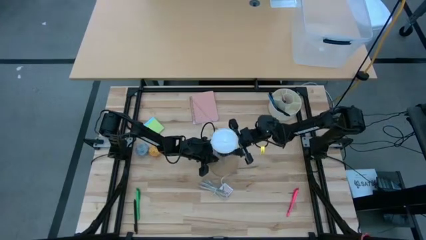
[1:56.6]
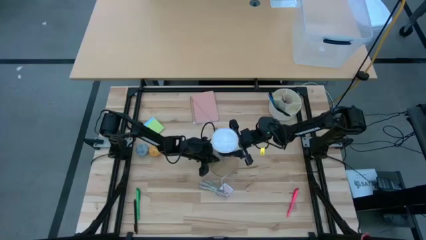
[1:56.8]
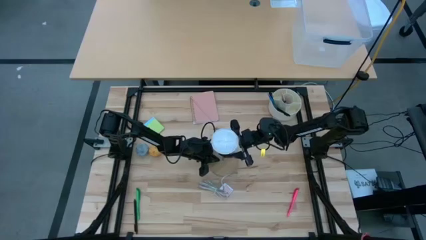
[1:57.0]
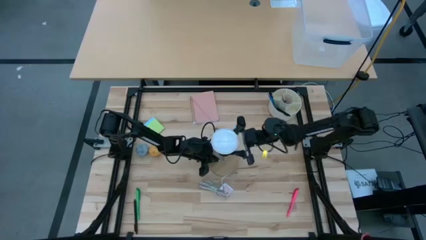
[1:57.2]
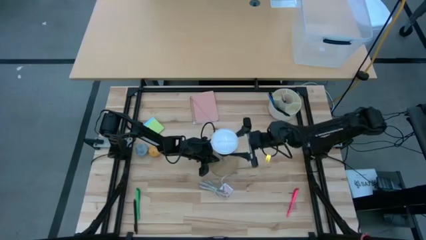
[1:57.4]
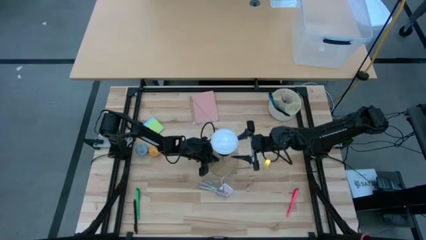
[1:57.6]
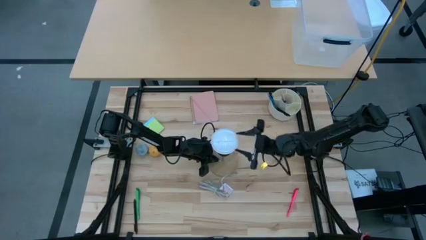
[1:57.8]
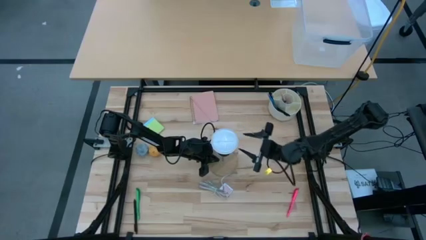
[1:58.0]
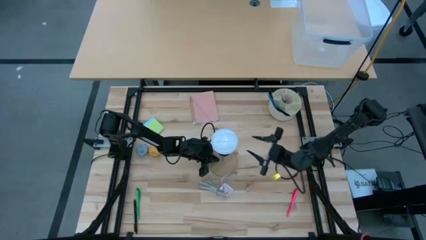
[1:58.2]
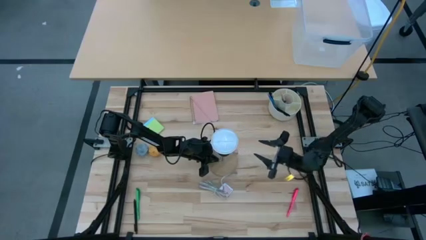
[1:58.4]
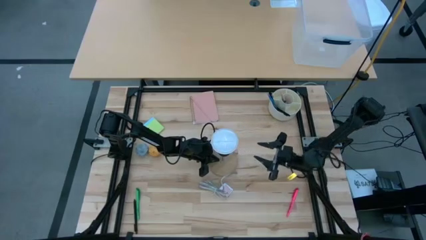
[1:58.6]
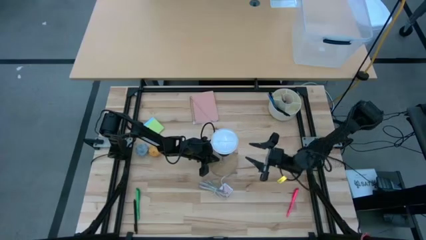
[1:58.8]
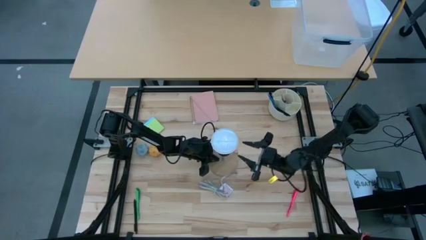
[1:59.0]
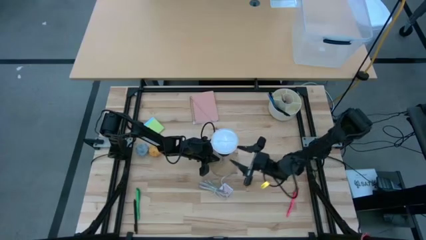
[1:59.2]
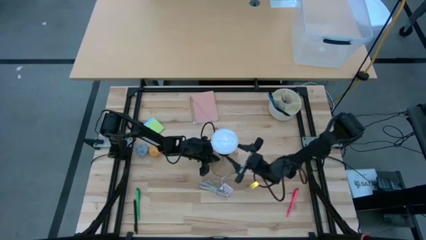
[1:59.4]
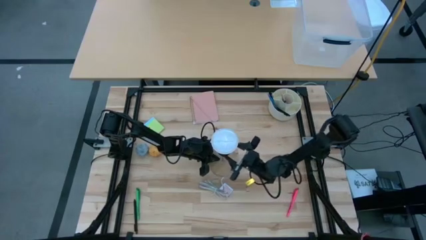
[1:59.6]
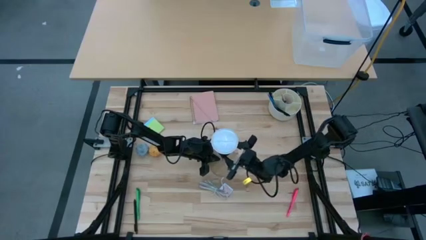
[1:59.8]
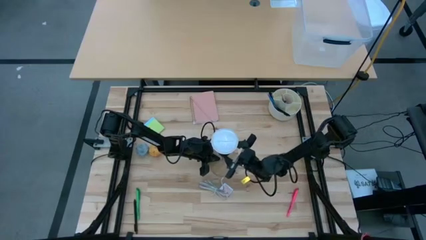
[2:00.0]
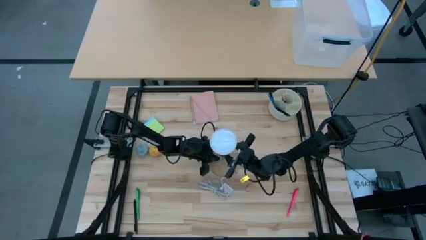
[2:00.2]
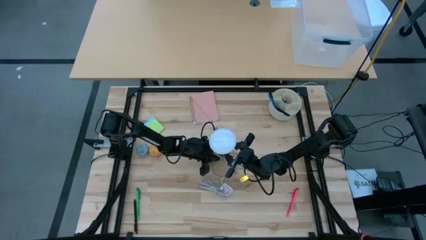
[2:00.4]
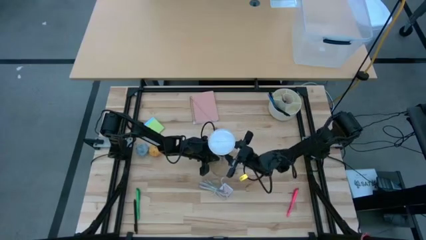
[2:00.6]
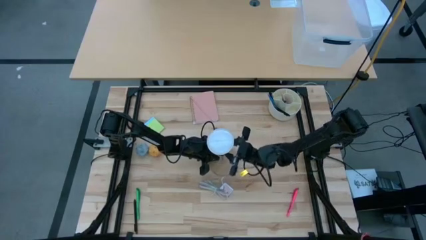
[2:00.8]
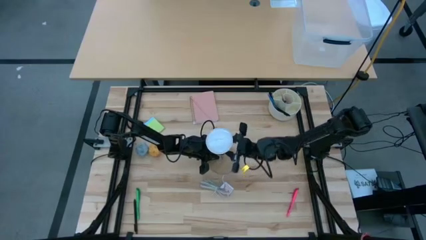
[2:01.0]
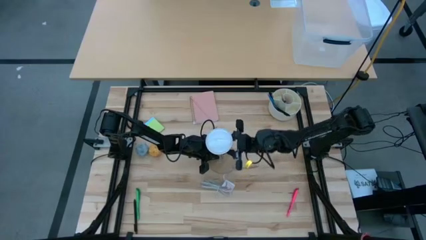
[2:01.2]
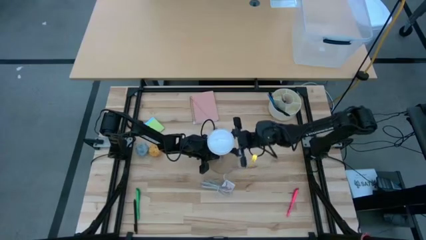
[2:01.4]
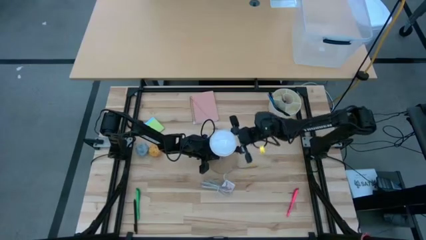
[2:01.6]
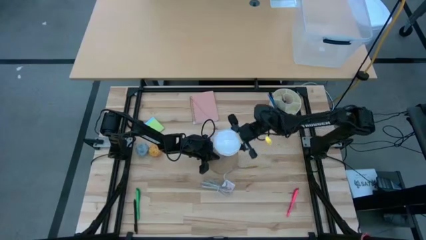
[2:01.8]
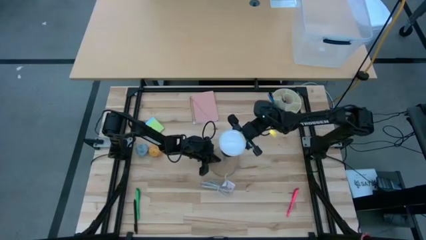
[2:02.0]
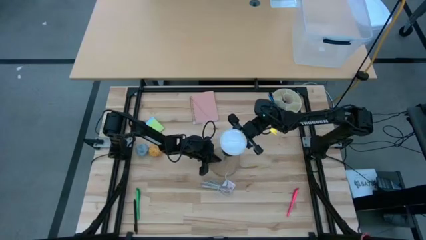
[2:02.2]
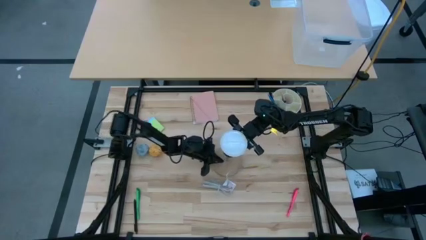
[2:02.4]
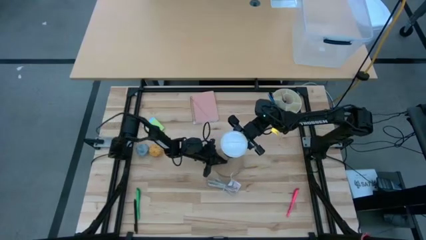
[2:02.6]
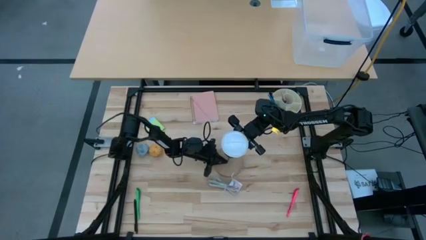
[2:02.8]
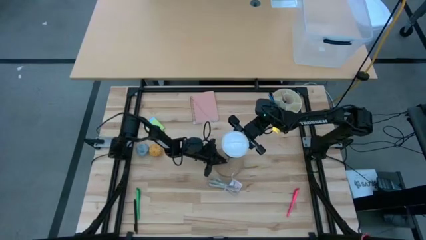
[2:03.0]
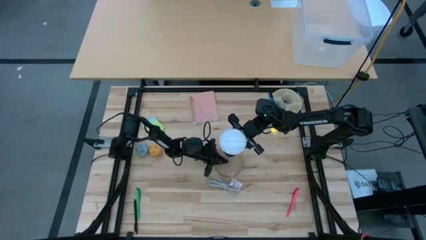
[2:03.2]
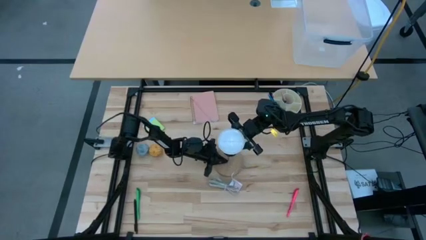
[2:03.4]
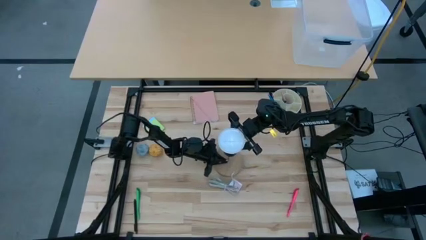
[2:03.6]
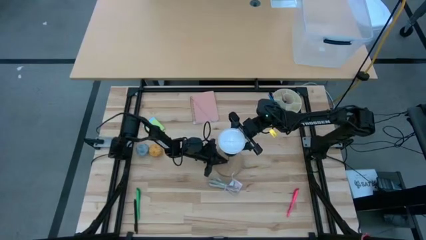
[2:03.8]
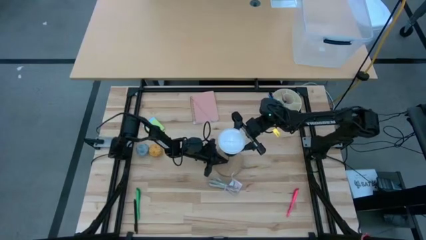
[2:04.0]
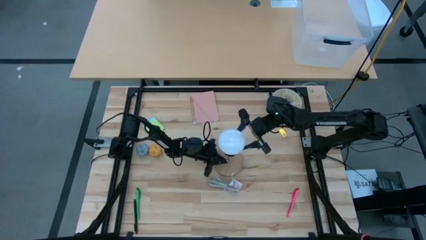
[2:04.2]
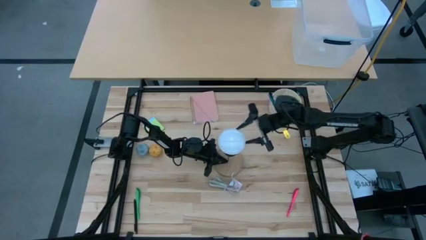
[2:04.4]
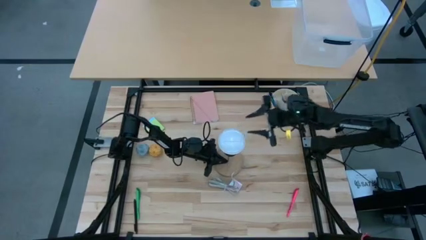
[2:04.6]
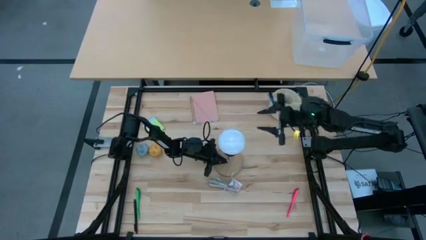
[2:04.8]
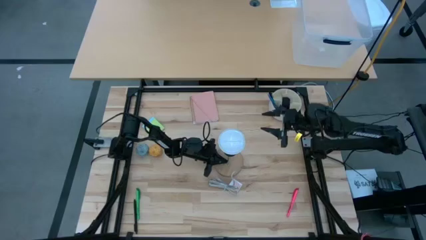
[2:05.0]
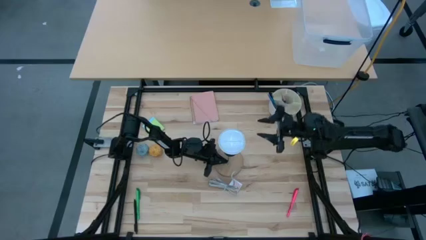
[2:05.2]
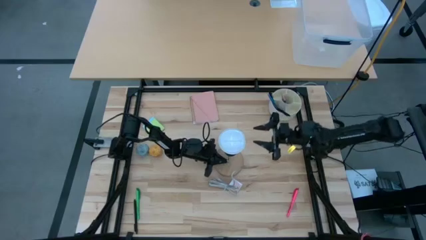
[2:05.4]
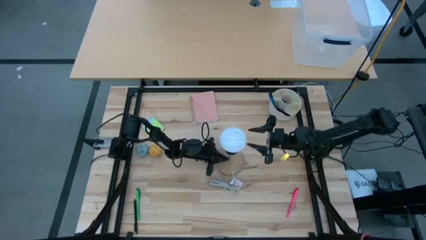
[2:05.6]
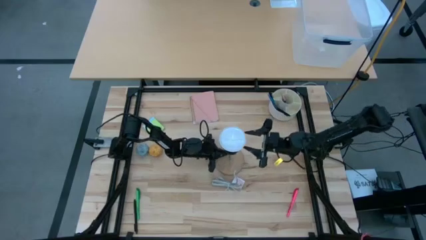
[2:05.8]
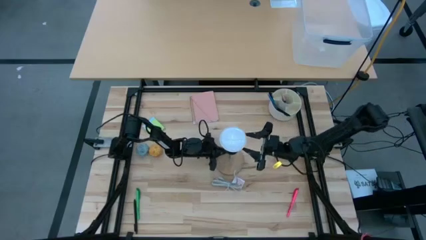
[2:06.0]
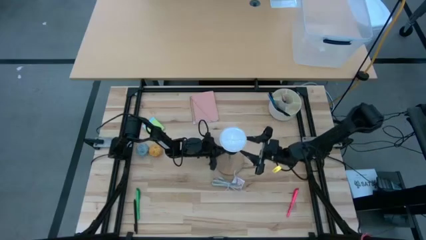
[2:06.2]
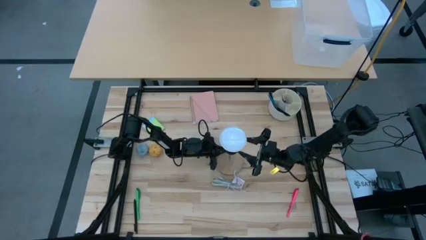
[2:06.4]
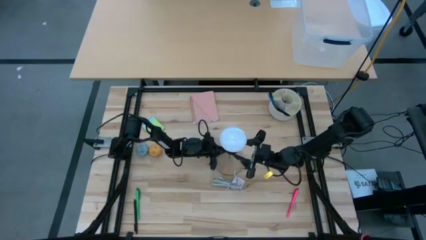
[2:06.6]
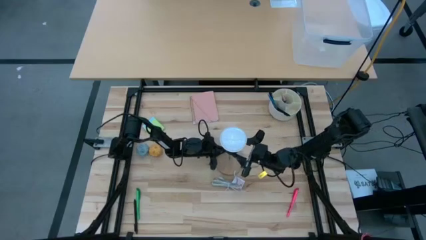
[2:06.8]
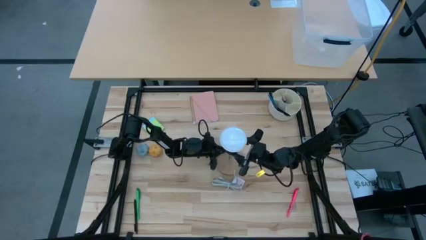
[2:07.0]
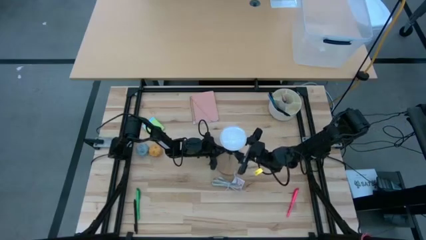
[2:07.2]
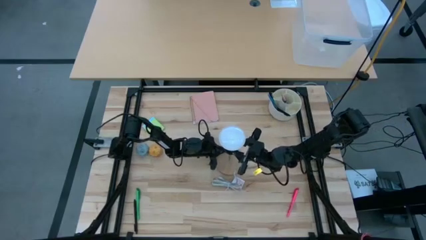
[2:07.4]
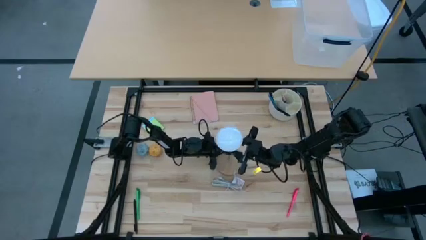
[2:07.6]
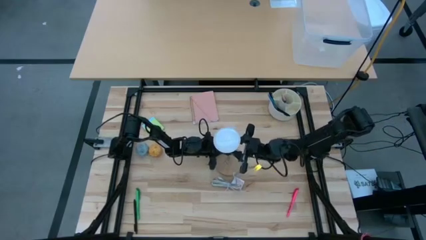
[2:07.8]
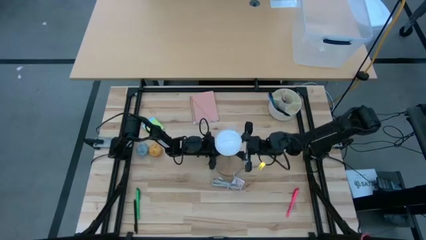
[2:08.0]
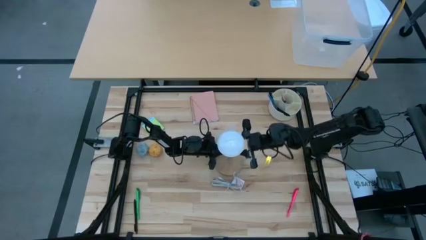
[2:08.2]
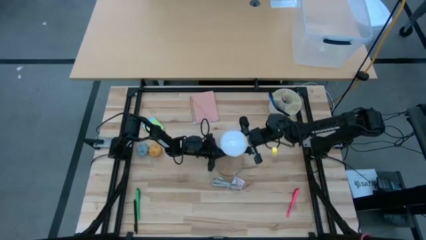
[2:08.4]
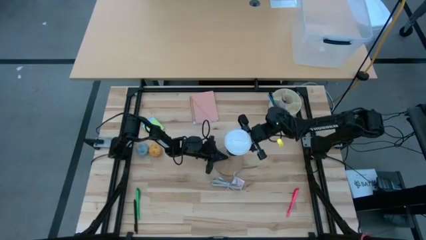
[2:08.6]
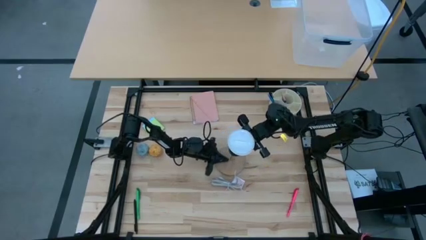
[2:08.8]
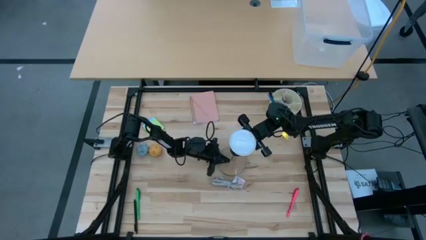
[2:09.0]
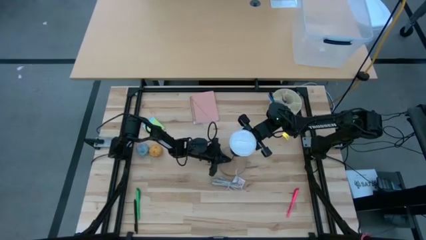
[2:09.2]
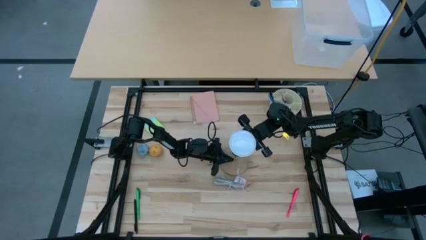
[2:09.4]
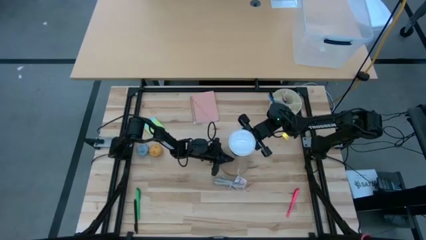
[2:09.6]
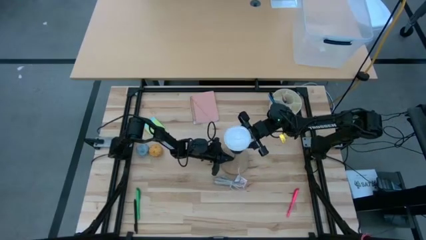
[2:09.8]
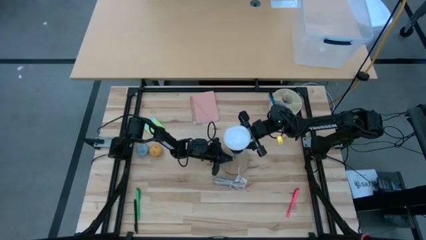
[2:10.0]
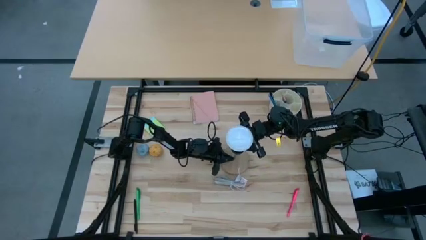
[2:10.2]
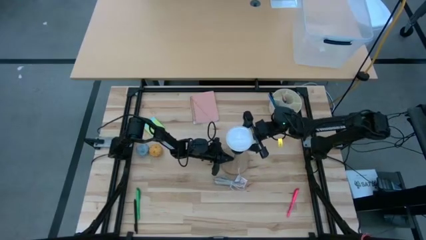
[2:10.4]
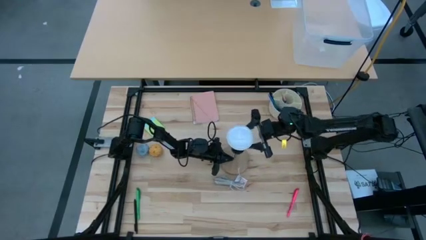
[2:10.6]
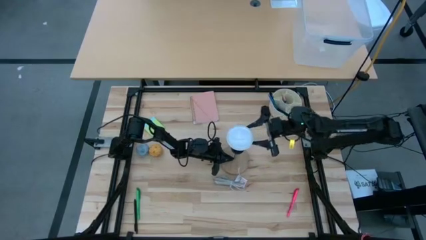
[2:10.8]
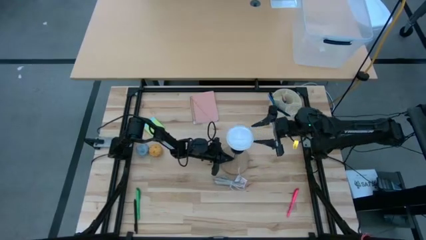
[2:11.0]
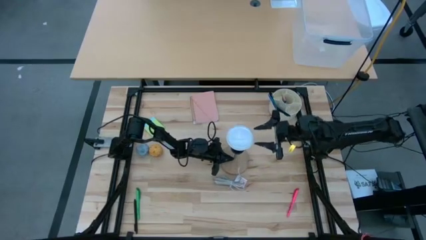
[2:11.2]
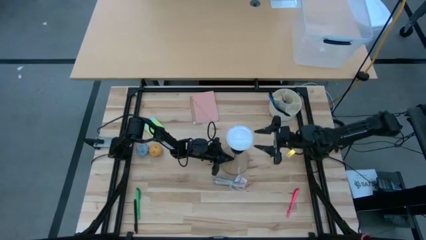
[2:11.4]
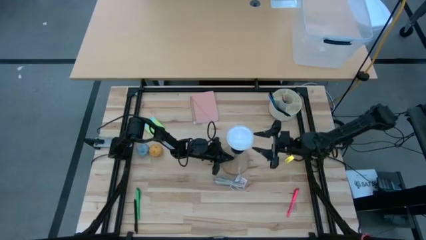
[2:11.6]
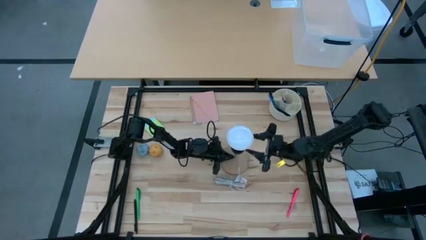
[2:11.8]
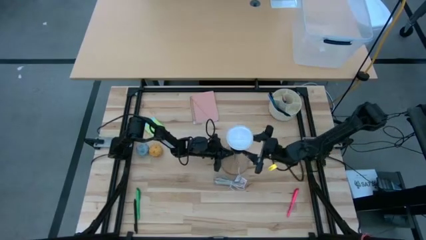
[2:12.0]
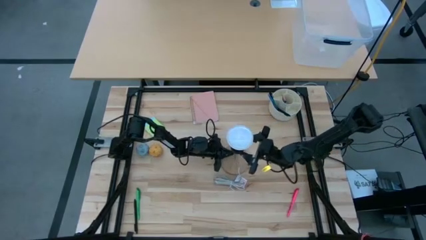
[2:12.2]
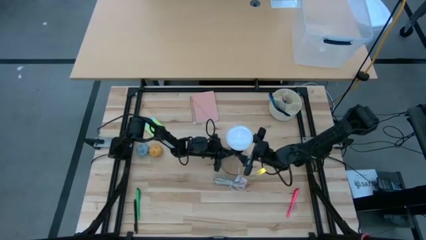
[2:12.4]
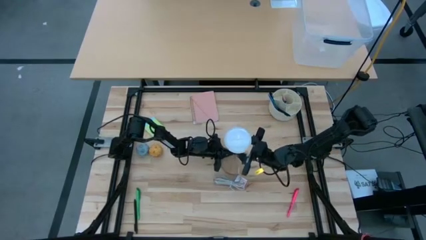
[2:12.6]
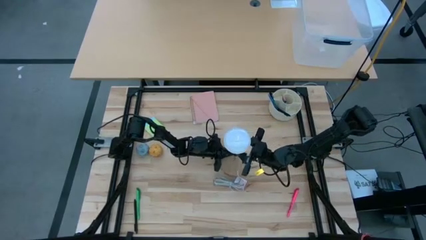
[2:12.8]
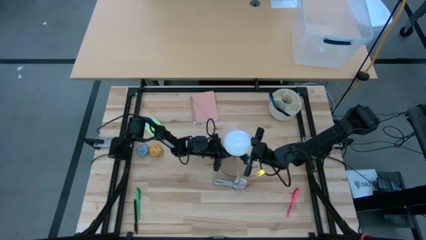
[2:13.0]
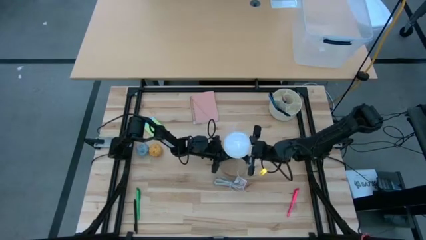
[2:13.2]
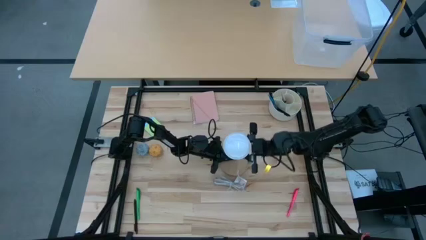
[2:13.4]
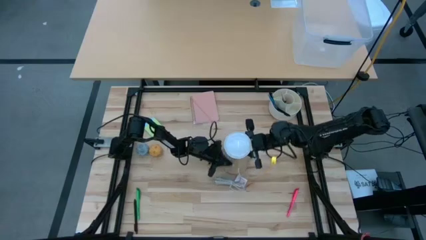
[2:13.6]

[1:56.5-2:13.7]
Task: Screw lightbulb
Remove the lightbulb from the lamp
